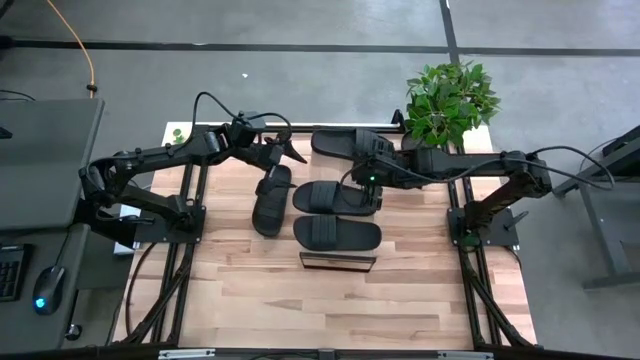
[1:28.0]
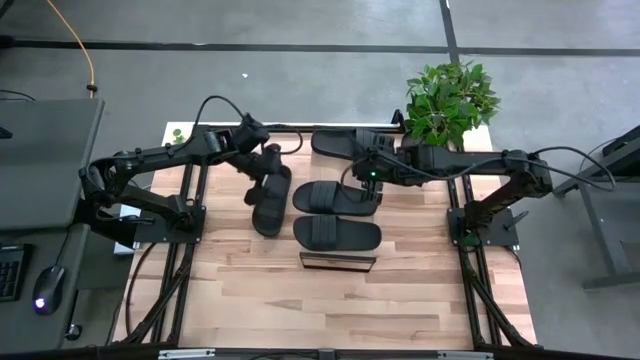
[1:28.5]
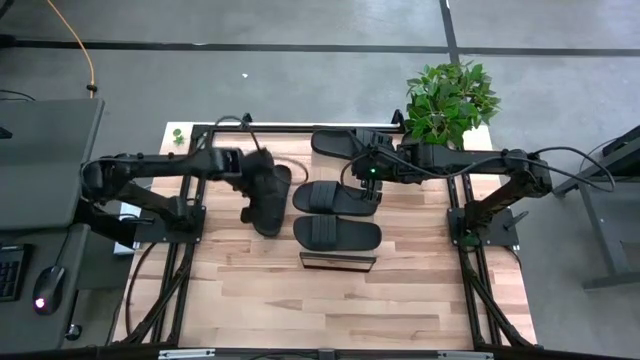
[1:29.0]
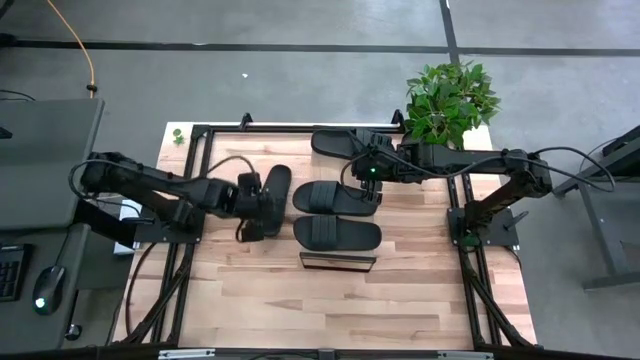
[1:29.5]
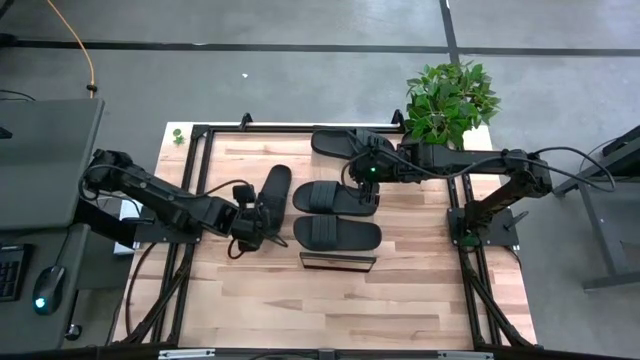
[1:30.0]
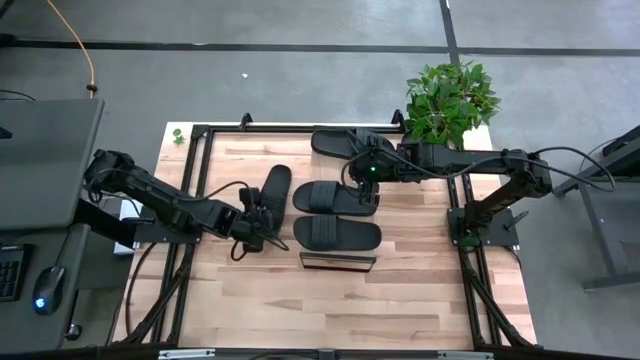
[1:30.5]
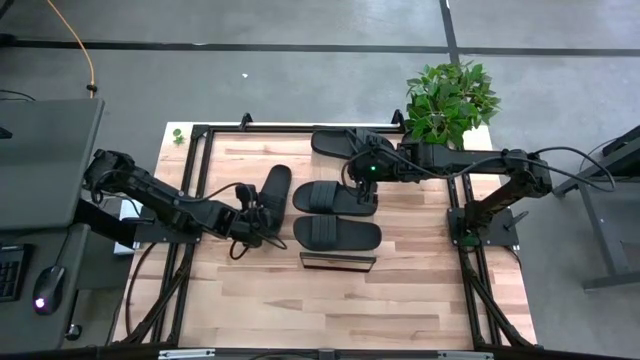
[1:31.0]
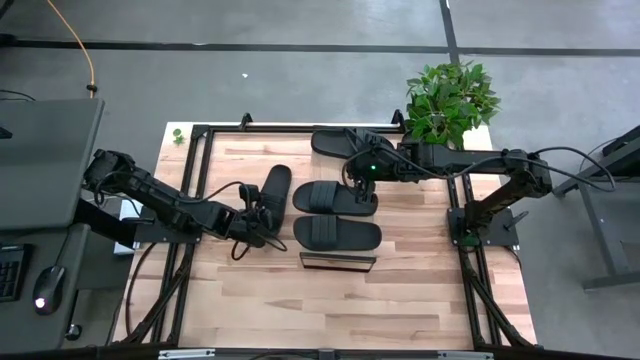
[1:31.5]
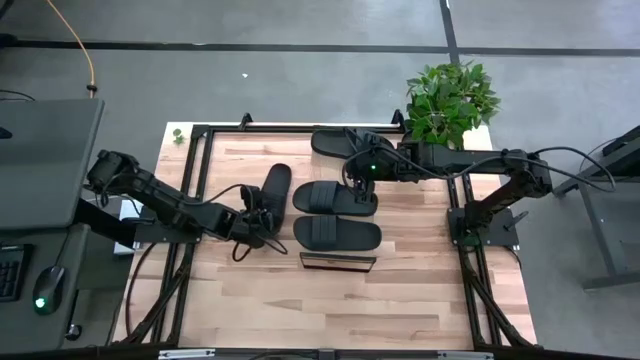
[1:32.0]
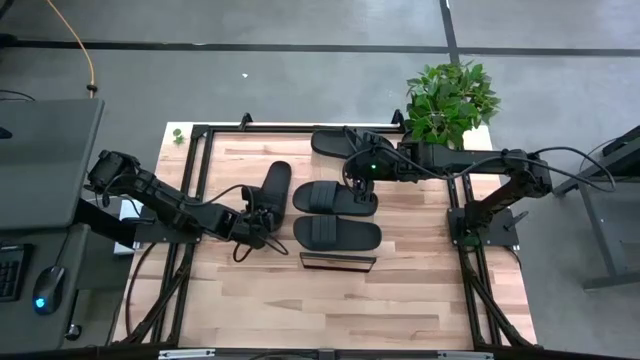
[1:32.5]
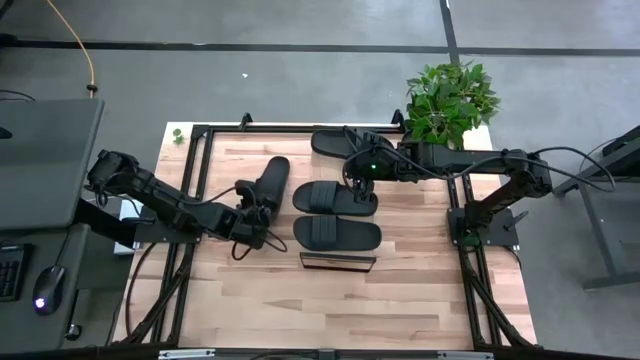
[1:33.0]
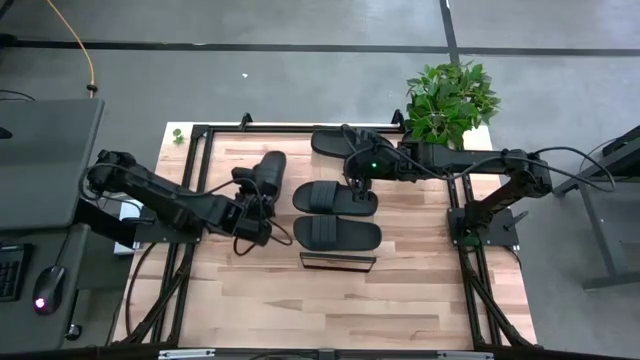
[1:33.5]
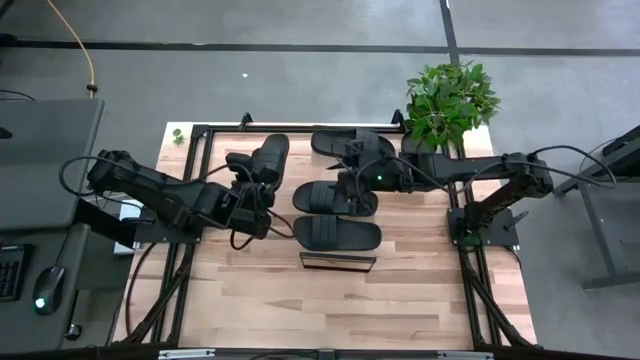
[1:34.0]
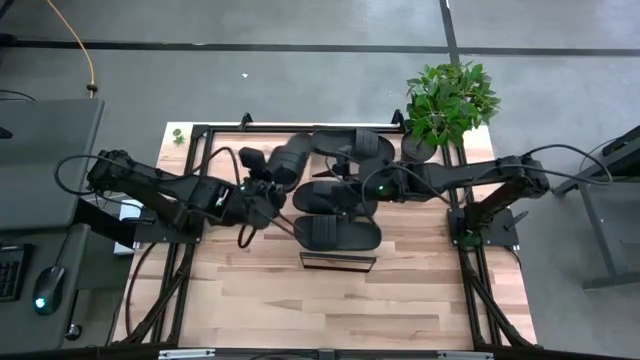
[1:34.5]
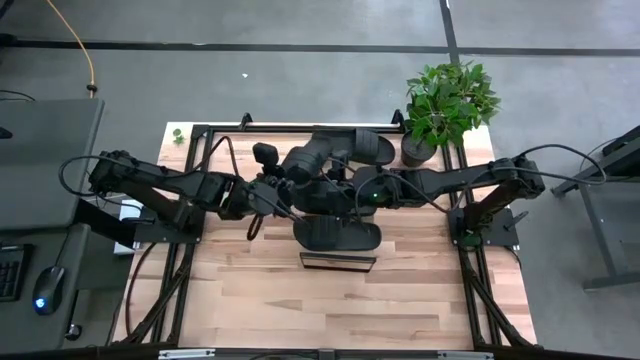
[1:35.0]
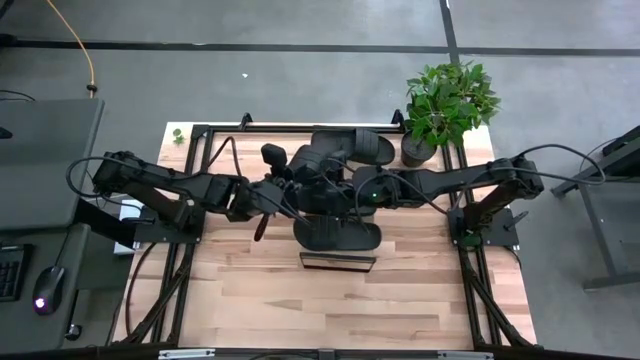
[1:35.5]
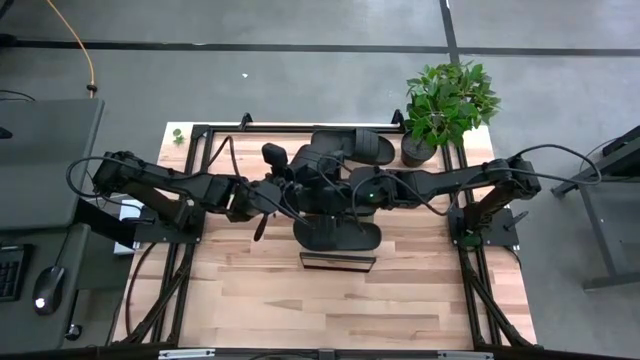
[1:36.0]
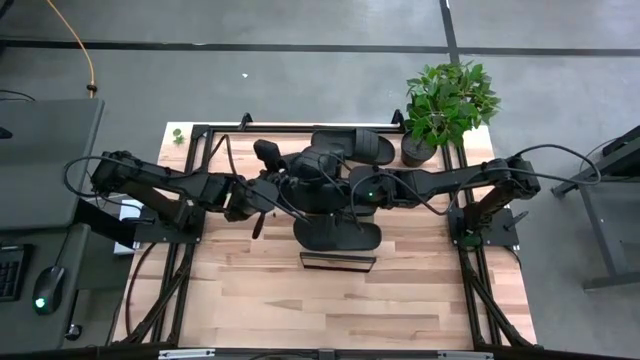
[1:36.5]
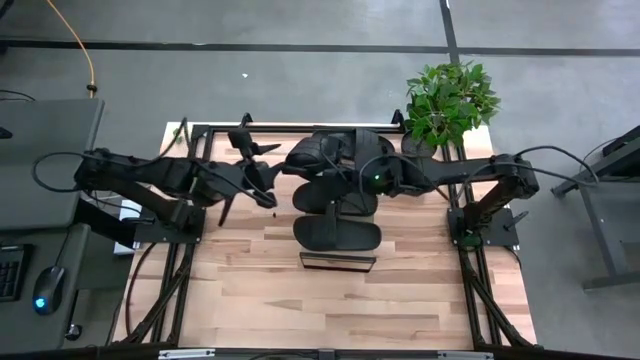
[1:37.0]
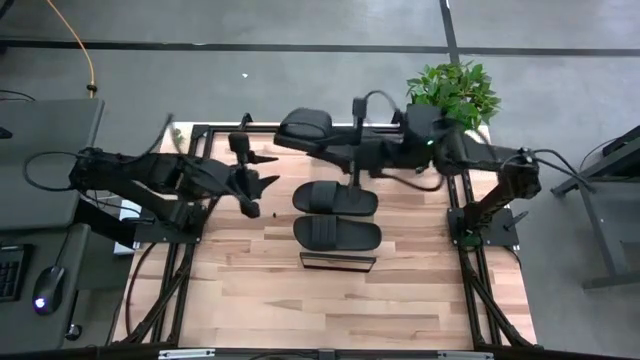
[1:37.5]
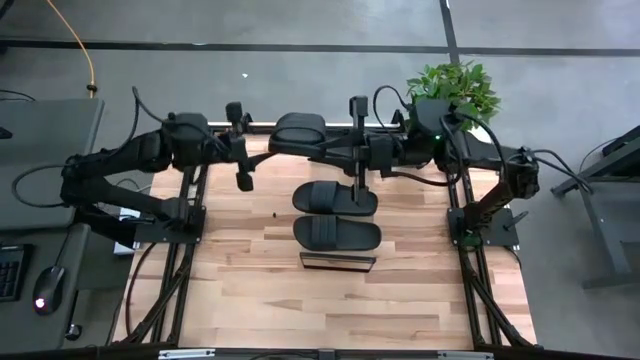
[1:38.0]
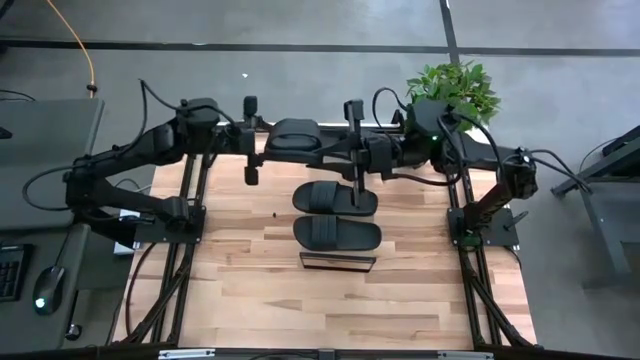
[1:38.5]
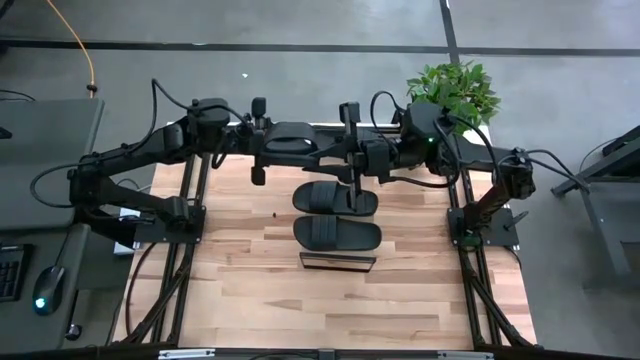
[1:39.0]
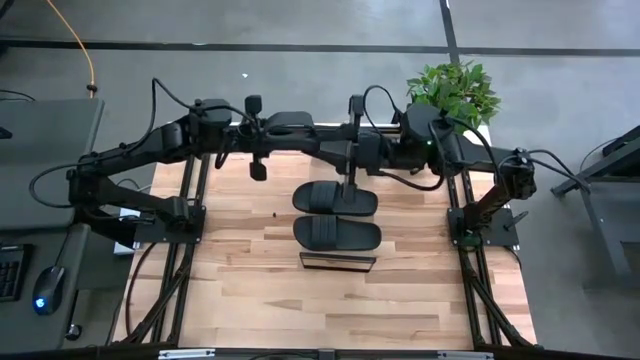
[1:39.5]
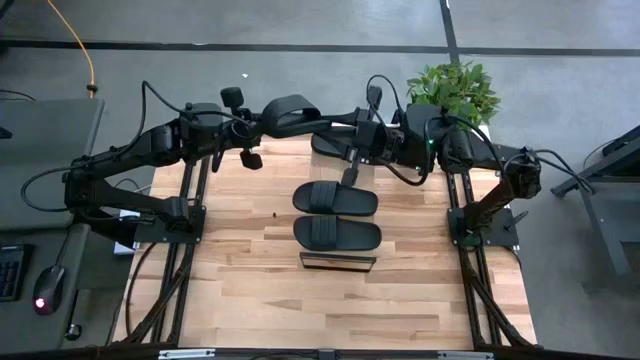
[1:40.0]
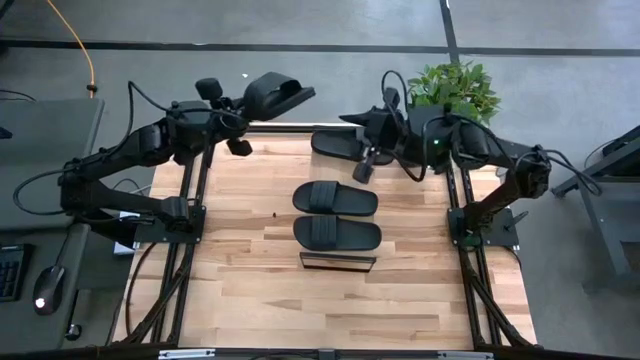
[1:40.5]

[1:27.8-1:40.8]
Task: Pick and place slides into the shelf
Put the black slipper on the shelf

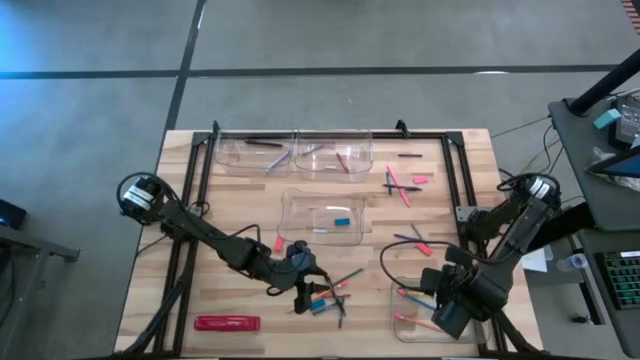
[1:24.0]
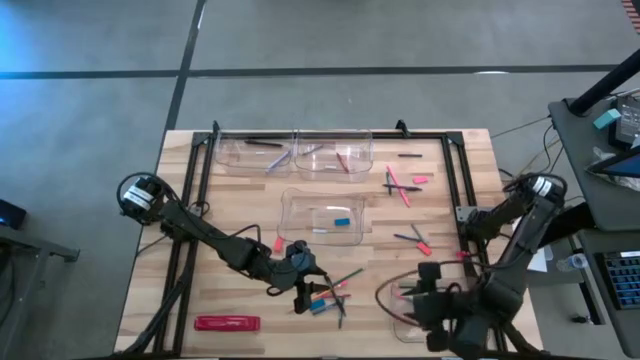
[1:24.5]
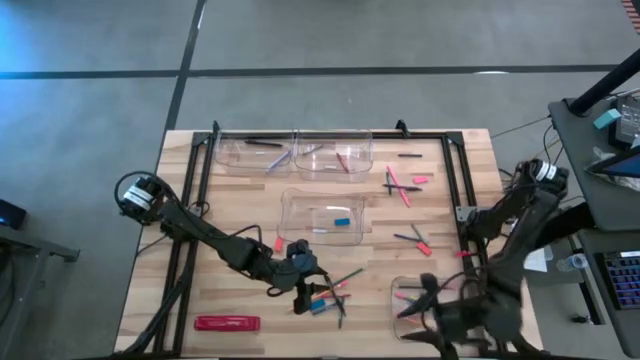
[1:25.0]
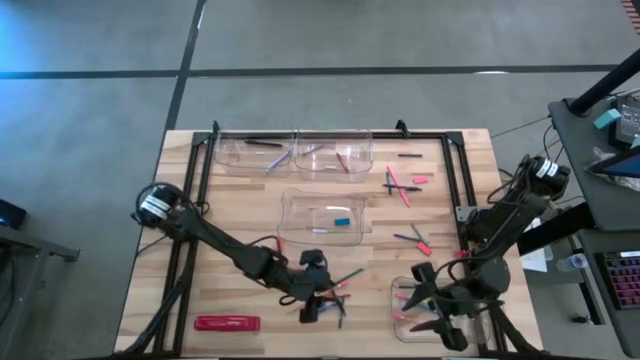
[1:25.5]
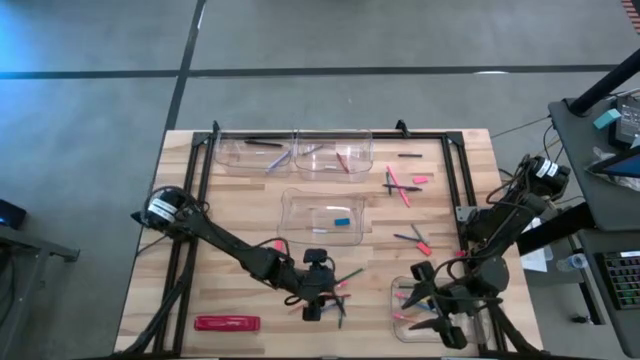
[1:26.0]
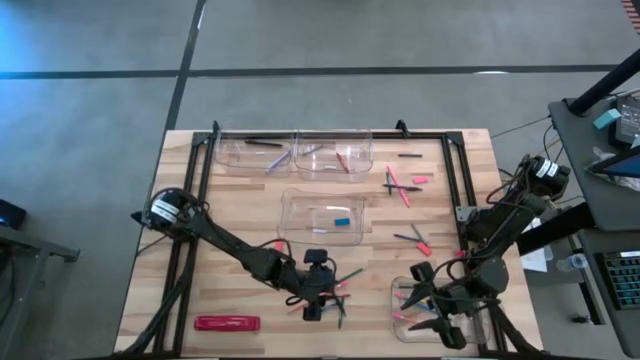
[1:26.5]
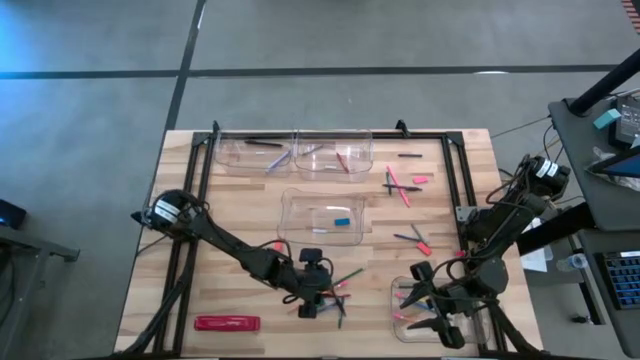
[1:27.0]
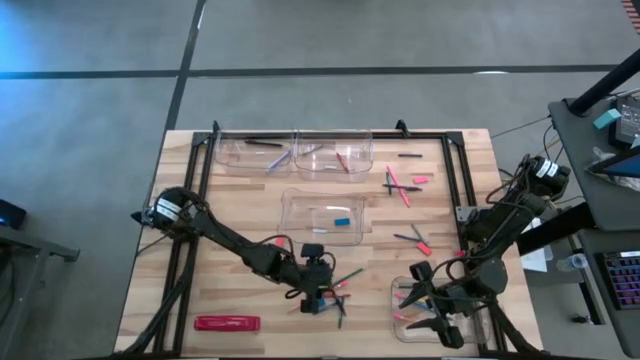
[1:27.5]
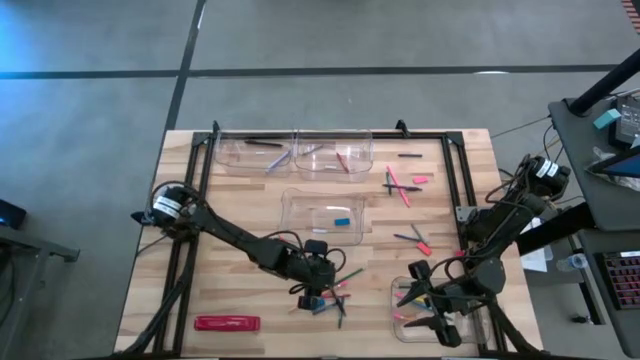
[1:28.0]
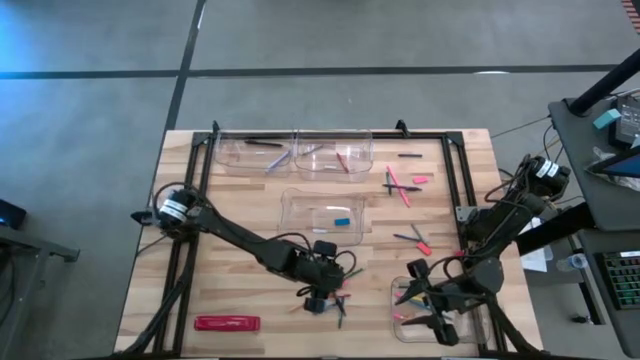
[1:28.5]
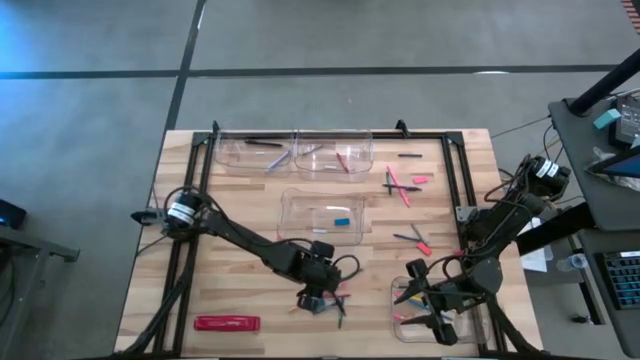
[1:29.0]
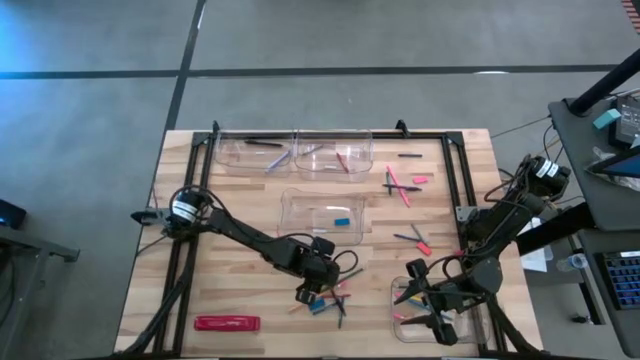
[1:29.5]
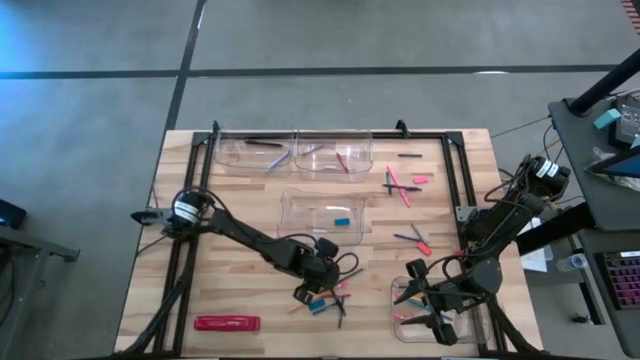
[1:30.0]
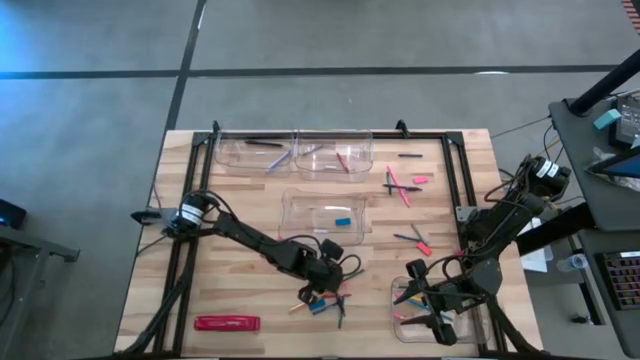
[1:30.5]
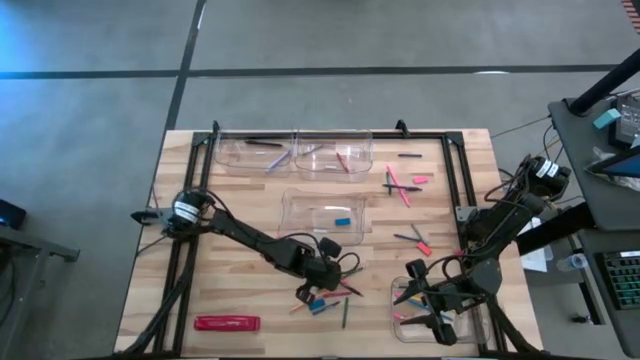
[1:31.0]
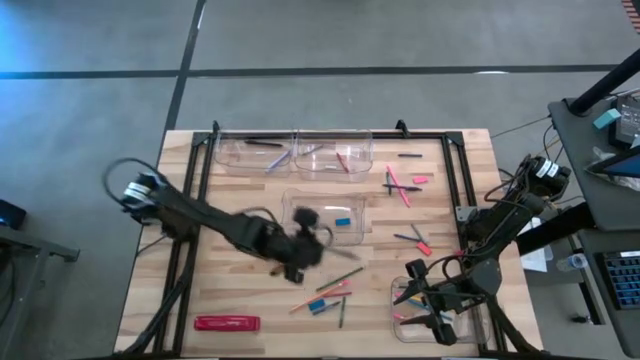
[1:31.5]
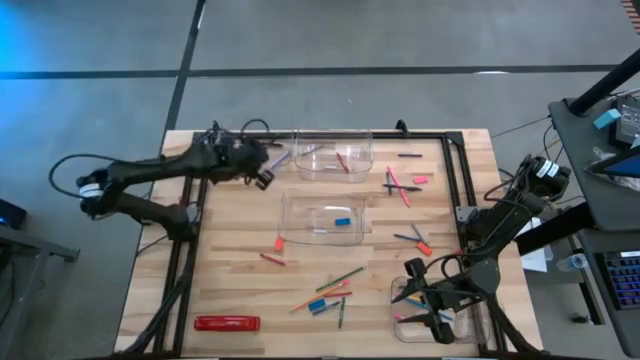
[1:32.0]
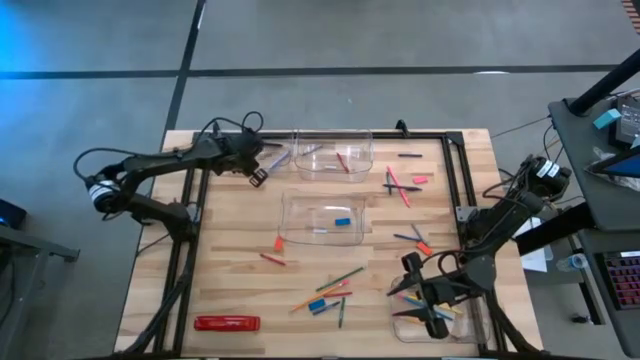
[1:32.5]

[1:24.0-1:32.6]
Task: Sort crayons/erasers/pens/pencils in bins
Put the black pen into the top left transparent bin
